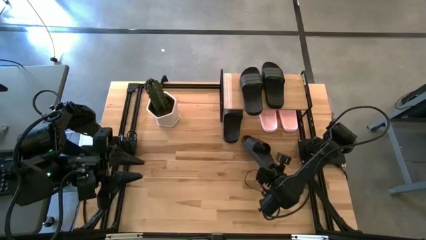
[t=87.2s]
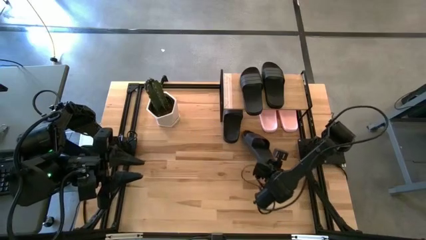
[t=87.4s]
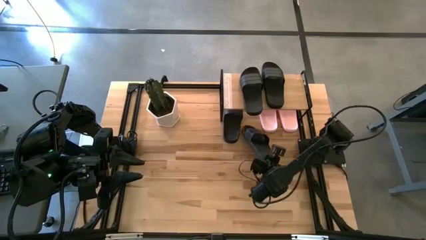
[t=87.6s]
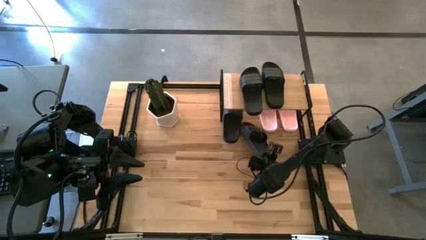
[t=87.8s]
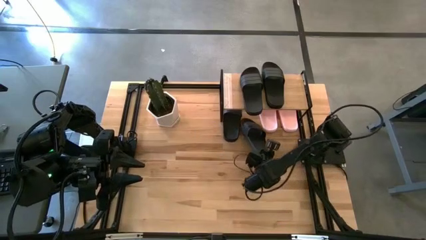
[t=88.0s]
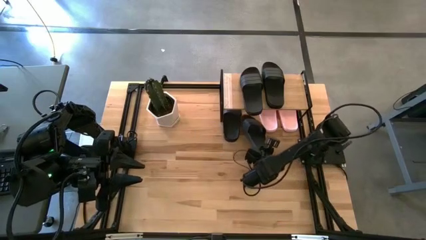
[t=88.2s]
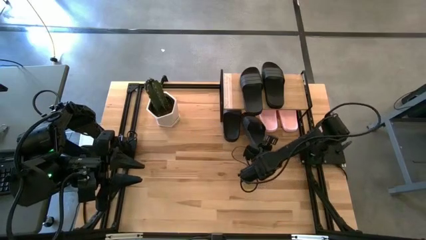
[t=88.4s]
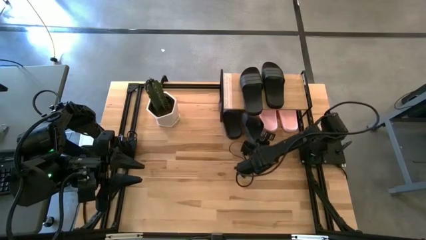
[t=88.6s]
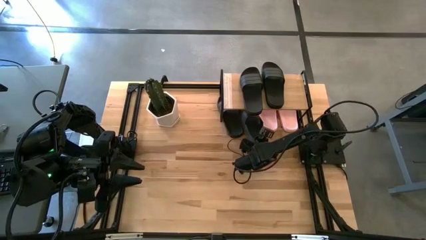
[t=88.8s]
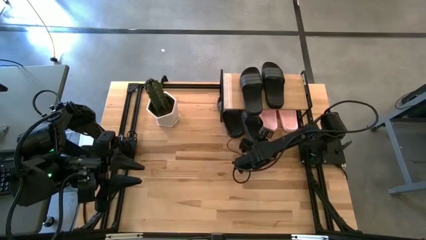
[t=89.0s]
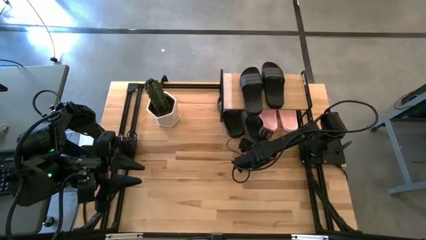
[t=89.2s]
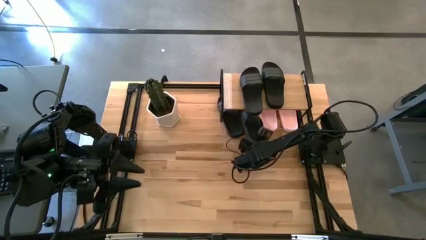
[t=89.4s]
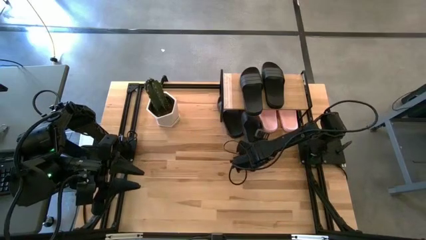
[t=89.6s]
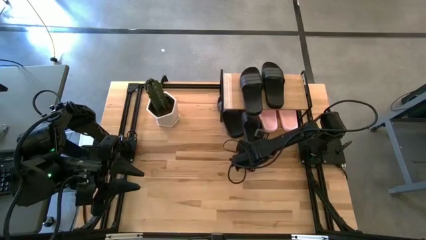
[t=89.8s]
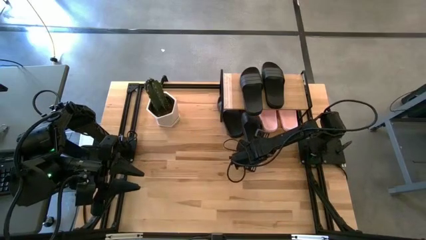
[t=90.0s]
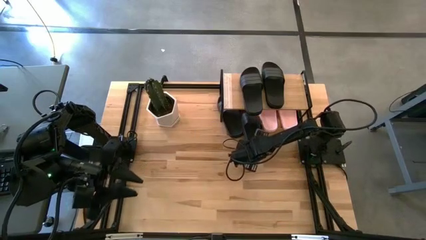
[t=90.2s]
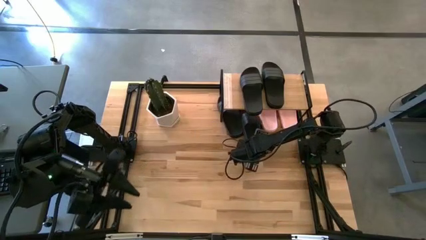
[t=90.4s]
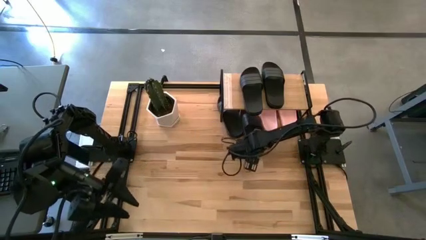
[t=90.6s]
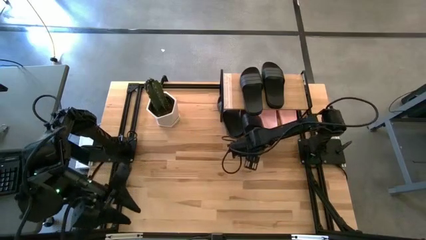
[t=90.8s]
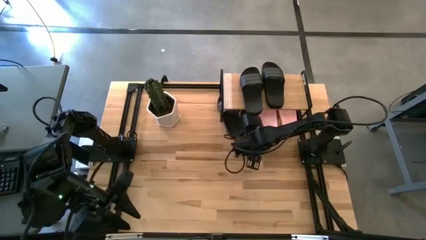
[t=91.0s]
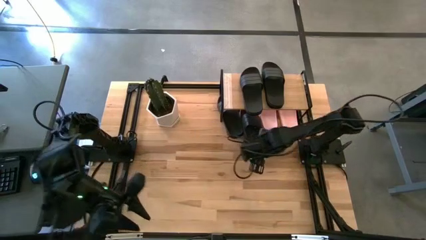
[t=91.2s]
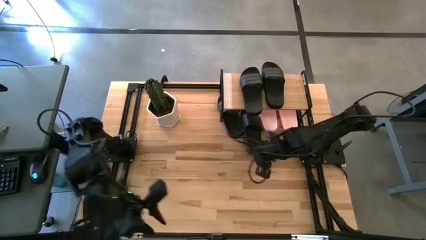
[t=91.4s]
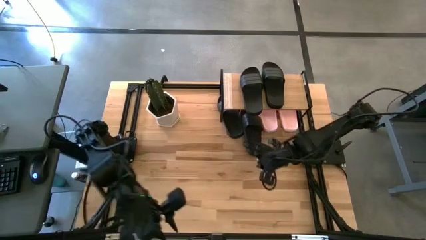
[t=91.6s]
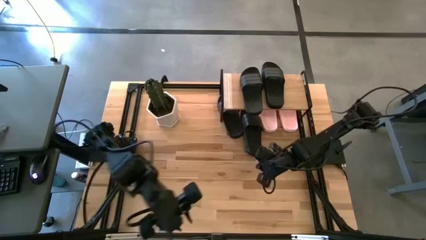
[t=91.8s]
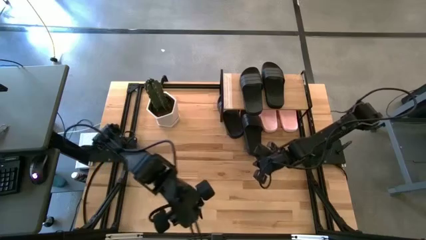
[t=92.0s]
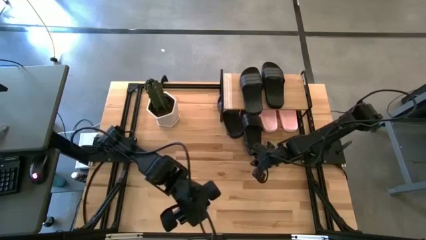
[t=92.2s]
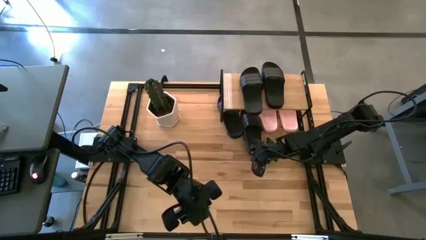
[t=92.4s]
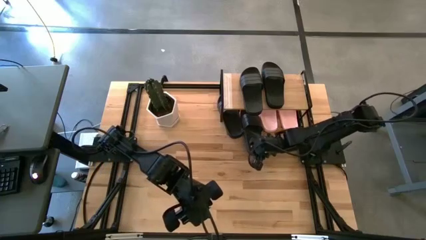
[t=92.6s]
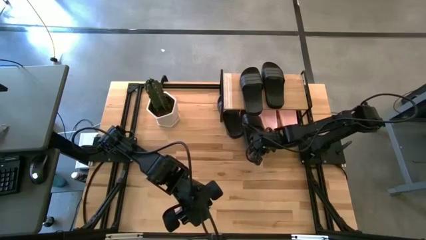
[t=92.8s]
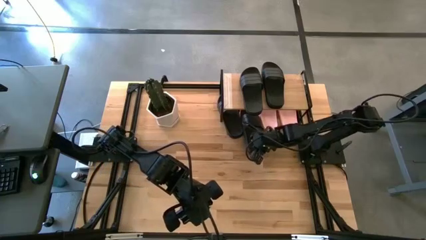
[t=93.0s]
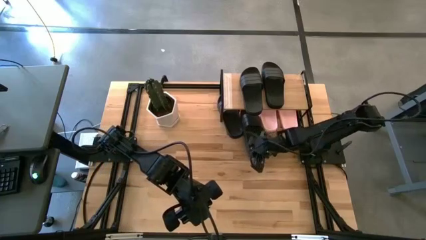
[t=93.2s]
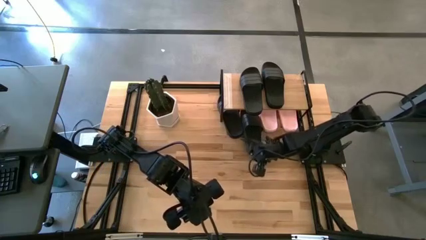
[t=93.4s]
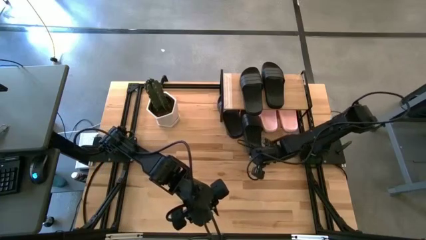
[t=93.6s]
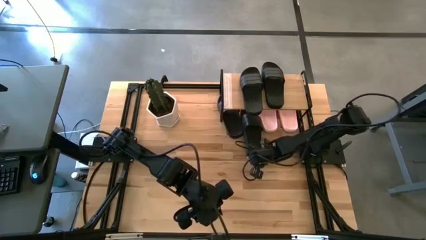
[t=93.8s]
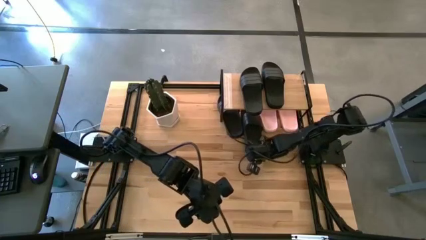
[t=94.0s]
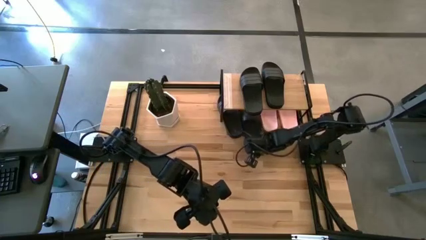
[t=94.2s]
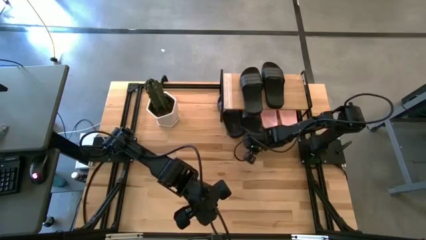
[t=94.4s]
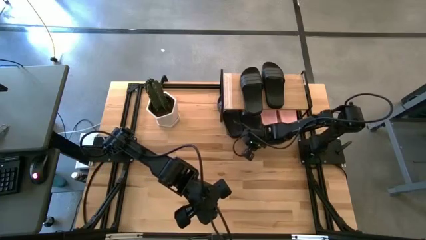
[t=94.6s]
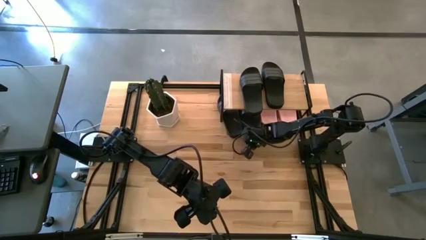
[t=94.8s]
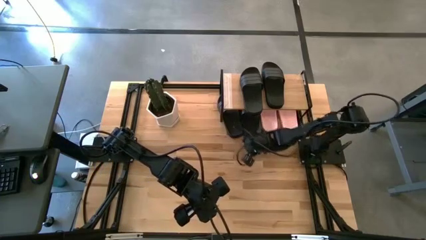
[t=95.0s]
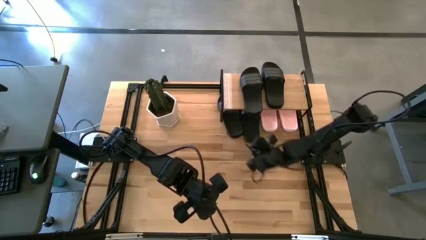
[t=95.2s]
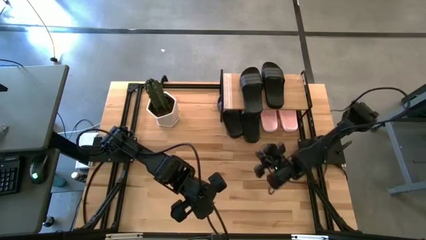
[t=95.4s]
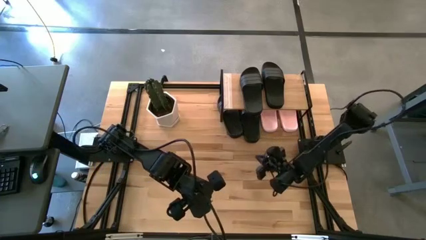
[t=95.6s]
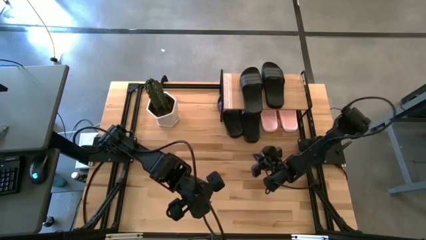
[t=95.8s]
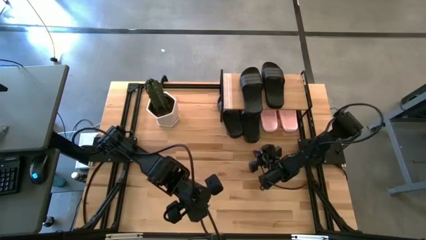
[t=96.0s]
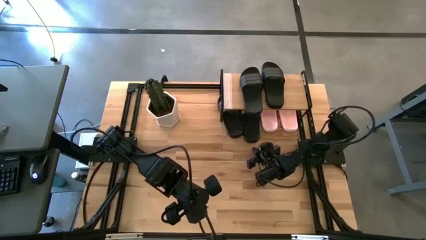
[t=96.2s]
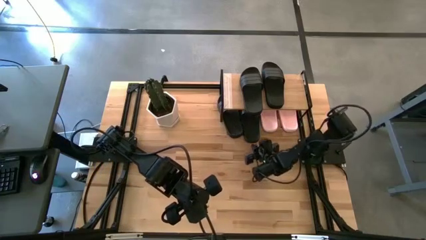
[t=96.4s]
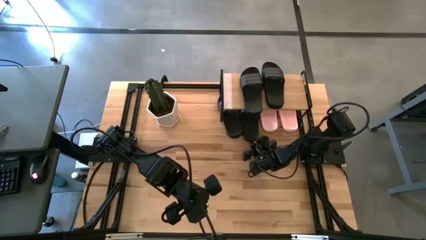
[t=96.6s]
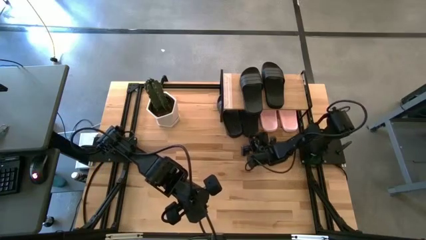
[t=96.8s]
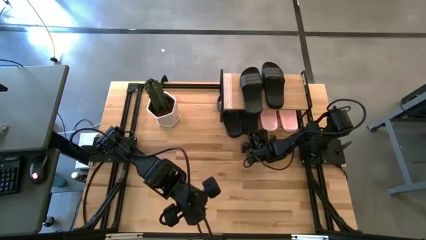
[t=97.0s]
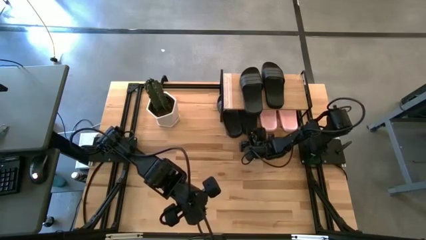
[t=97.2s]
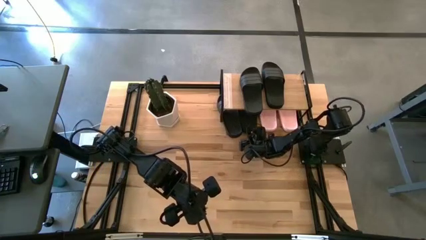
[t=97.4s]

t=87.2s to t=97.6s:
Task: Pick and place slides into the shelf
Put the black slipper under the shelf

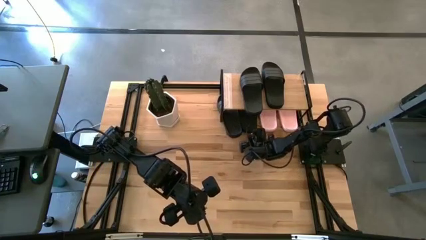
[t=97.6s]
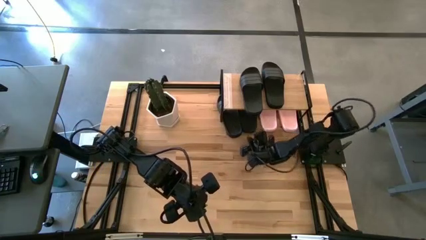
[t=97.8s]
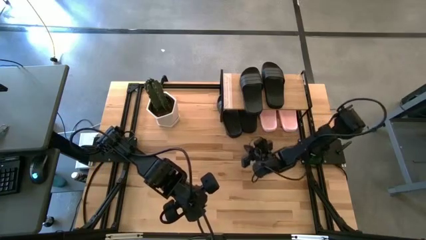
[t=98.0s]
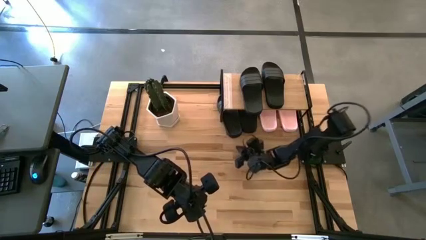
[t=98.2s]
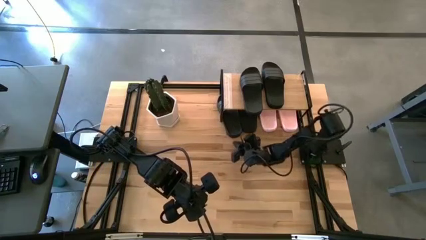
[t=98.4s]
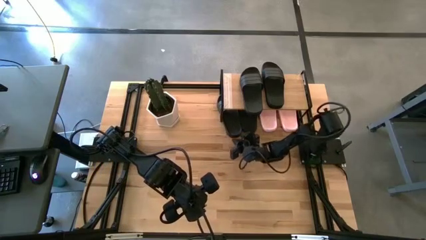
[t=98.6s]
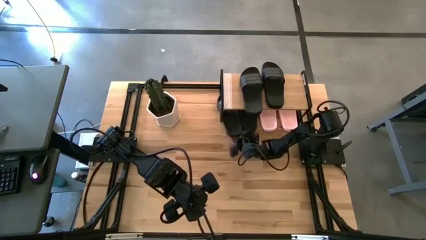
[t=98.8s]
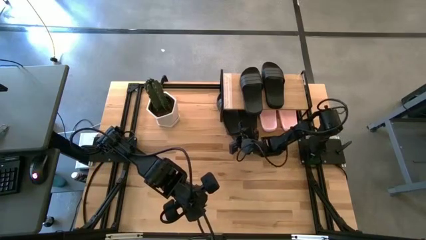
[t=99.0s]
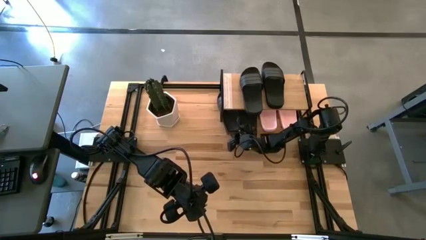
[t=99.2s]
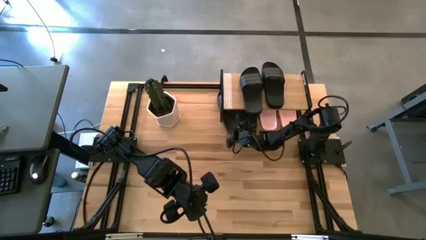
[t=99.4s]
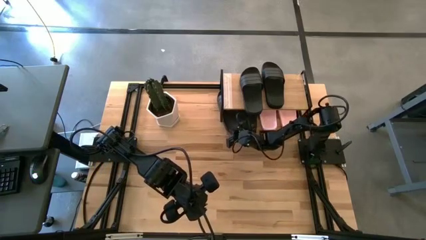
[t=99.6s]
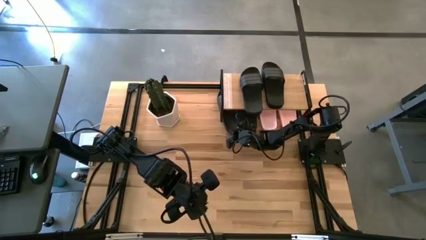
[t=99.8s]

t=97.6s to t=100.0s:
Adjust the black slipper under the shelf

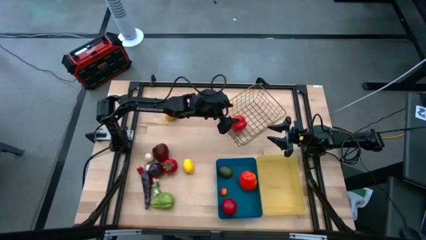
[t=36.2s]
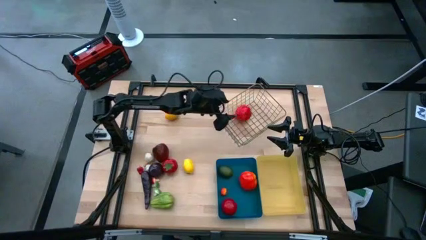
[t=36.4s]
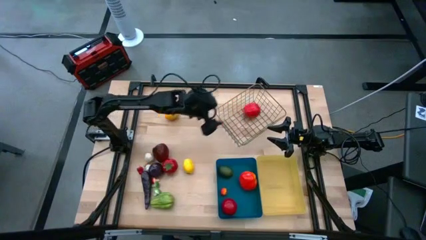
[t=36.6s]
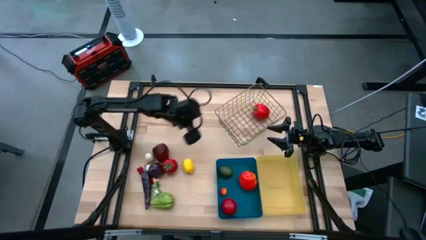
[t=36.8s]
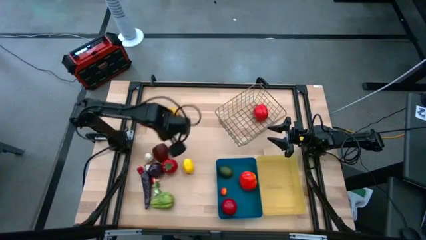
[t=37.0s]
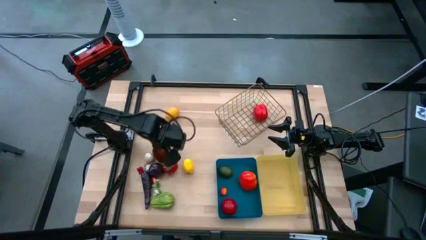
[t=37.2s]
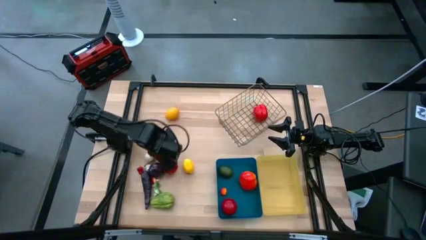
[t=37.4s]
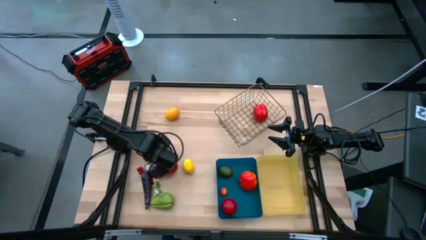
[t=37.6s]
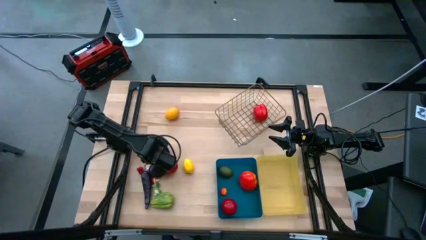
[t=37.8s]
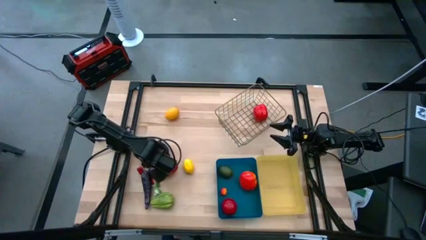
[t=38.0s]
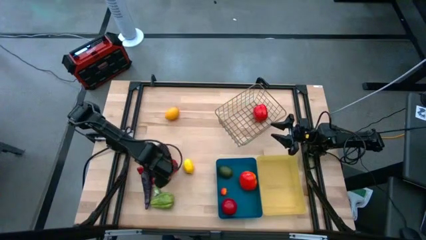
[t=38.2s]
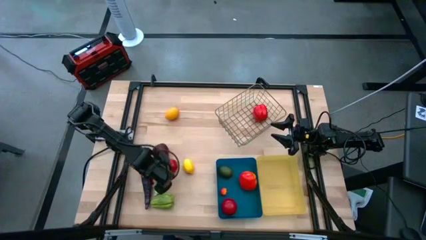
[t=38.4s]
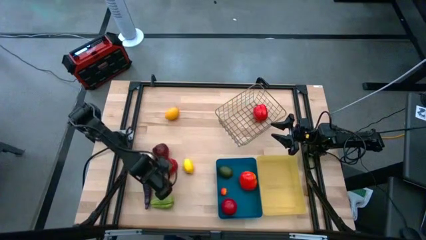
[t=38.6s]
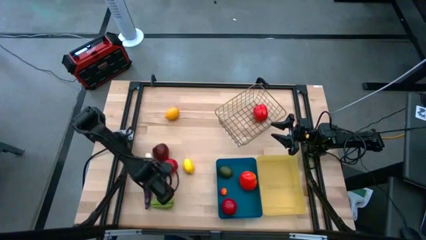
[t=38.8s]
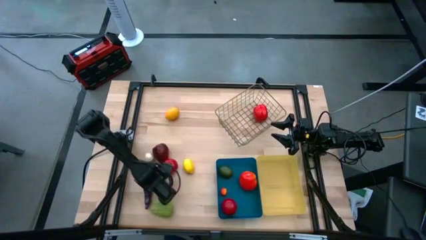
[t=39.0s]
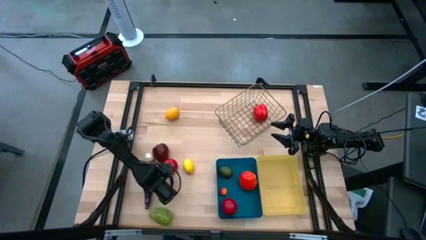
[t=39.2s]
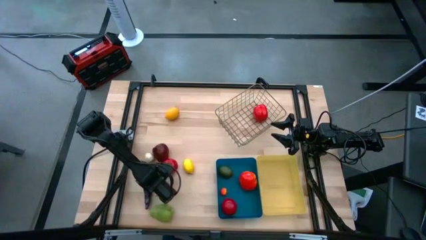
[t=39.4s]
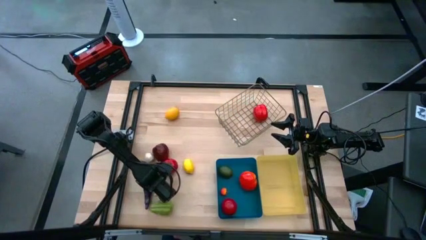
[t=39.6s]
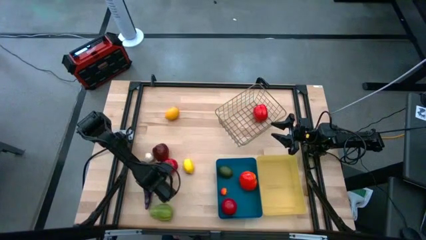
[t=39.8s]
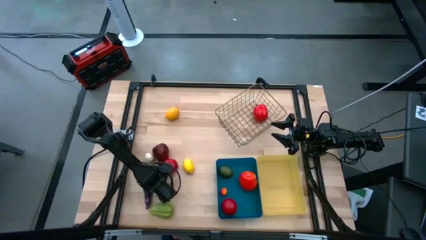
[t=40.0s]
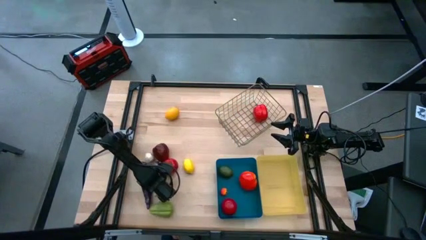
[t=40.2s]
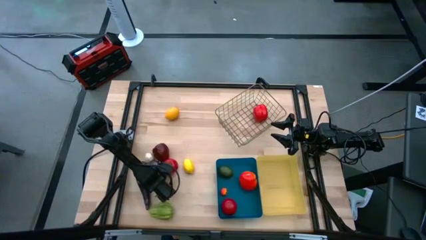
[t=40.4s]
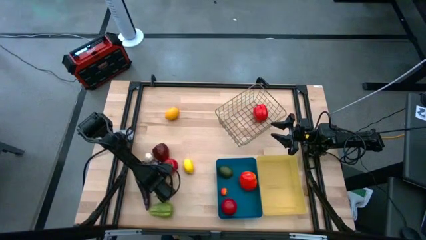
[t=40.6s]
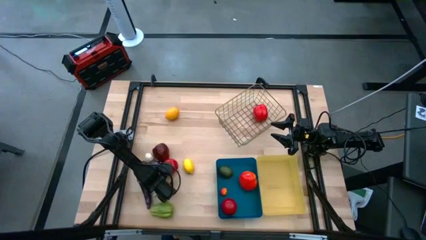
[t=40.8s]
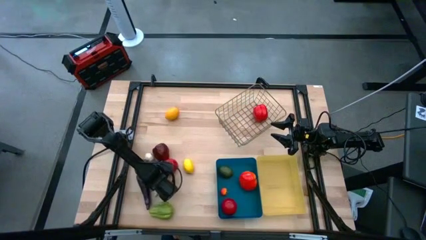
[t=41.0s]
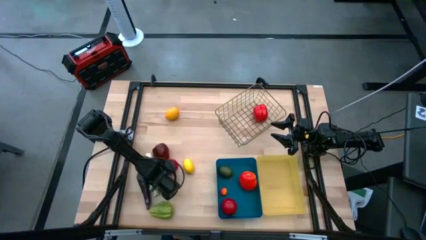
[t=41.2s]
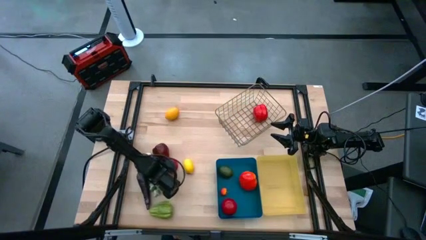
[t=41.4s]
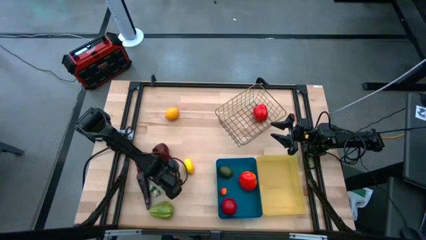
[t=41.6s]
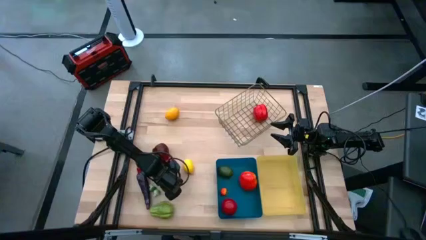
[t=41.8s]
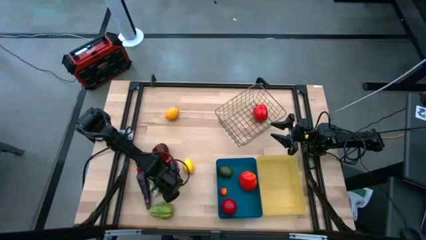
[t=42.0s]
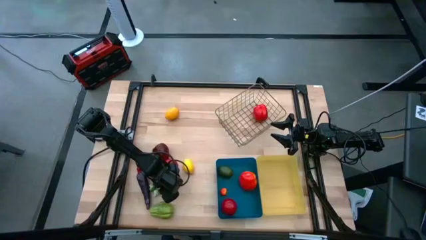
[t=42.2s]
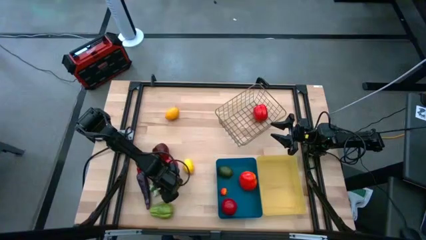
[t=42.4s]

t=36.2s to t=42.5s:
Task: Sort produce into baskets
Put the orange mushroom into the yellow bin
